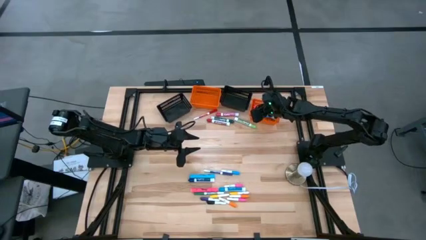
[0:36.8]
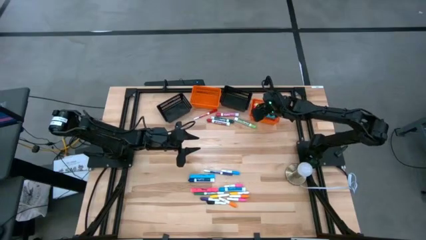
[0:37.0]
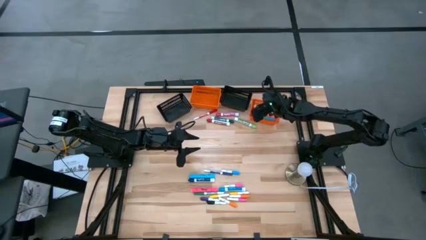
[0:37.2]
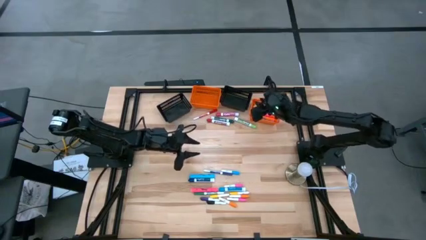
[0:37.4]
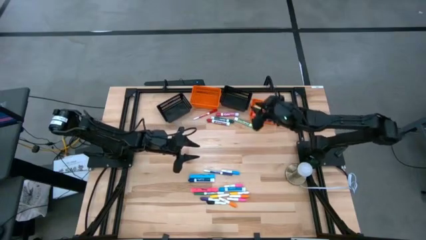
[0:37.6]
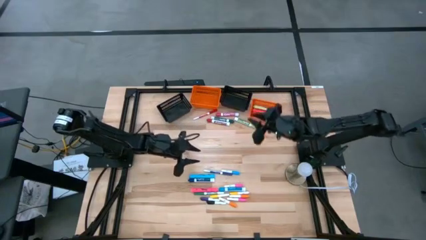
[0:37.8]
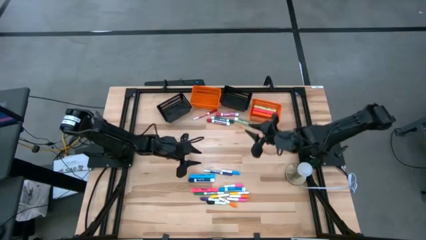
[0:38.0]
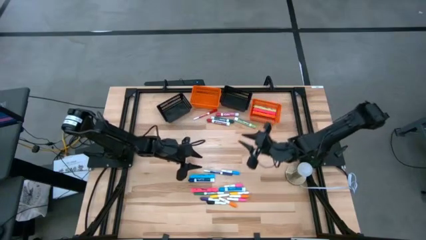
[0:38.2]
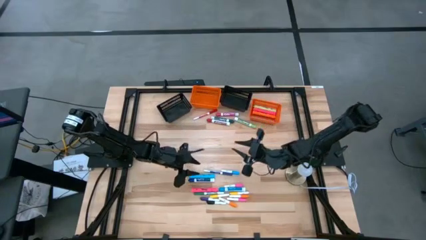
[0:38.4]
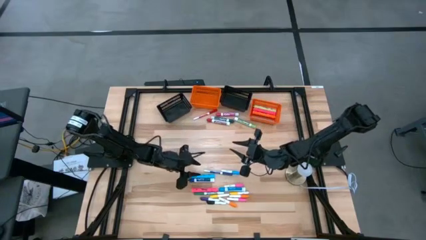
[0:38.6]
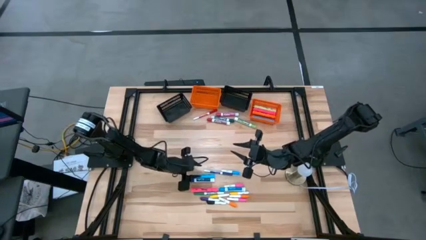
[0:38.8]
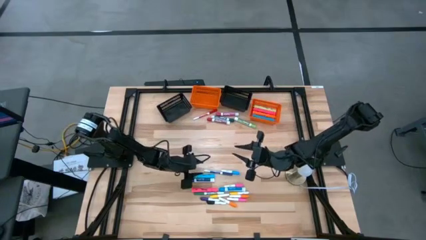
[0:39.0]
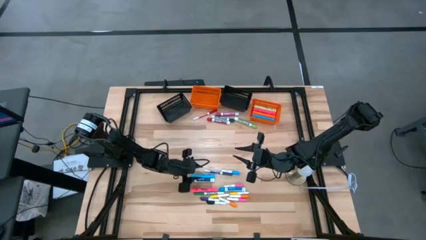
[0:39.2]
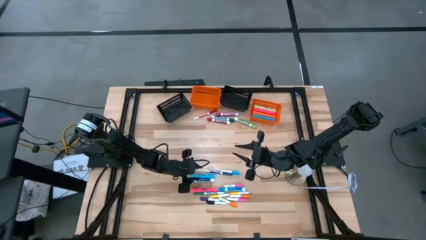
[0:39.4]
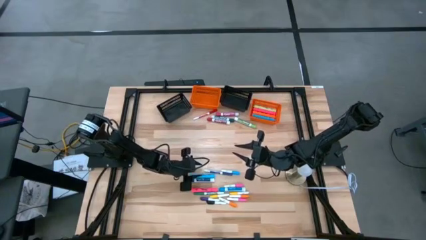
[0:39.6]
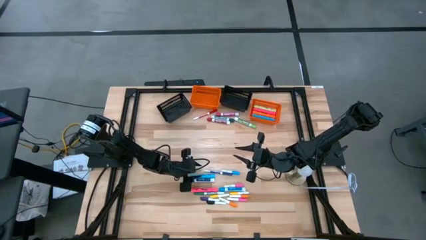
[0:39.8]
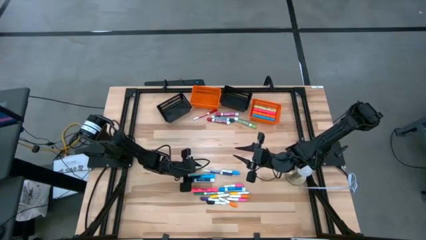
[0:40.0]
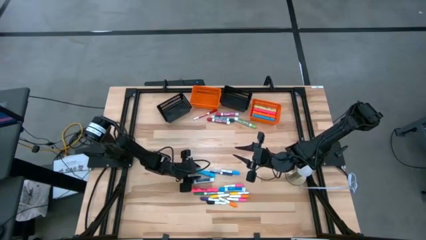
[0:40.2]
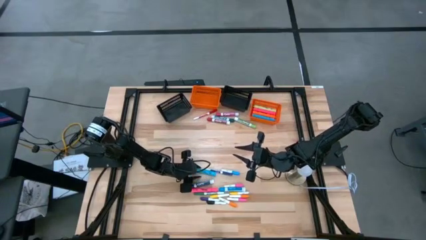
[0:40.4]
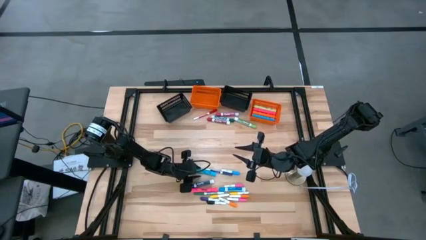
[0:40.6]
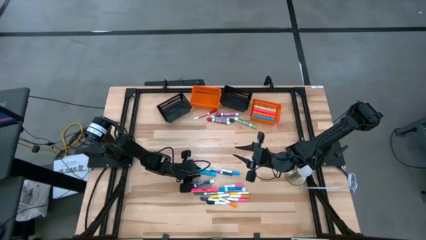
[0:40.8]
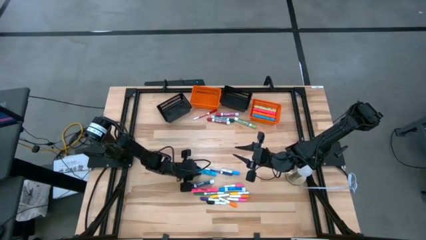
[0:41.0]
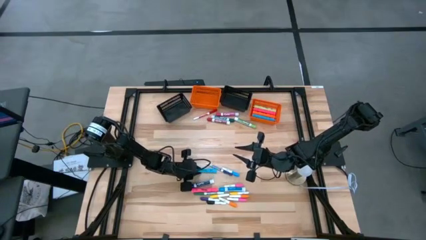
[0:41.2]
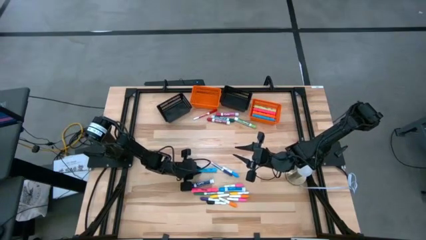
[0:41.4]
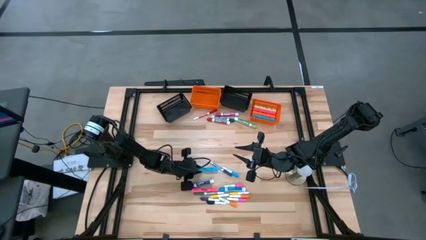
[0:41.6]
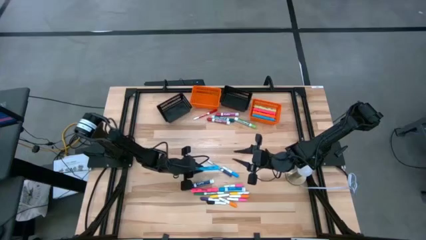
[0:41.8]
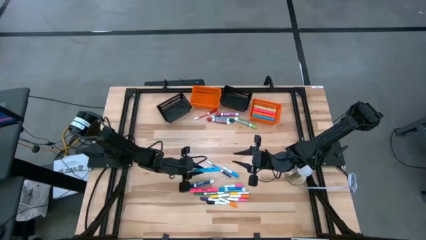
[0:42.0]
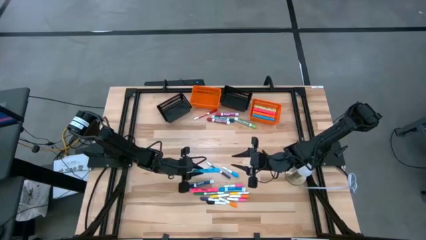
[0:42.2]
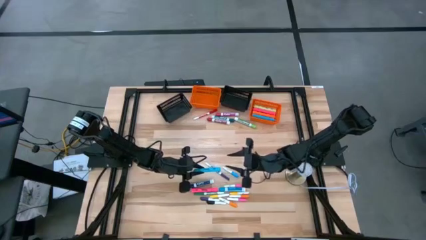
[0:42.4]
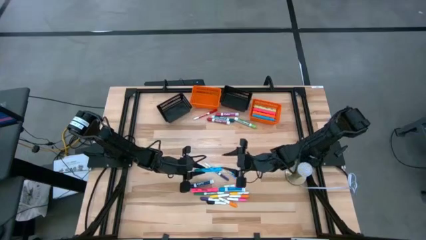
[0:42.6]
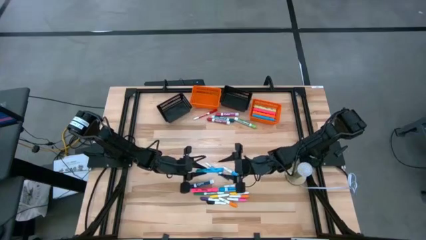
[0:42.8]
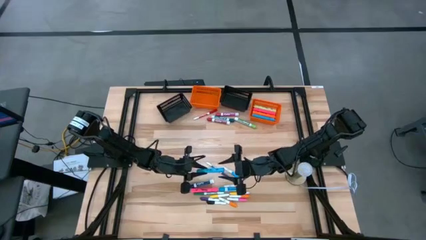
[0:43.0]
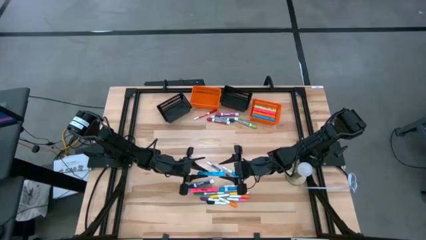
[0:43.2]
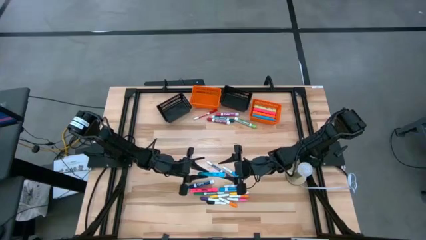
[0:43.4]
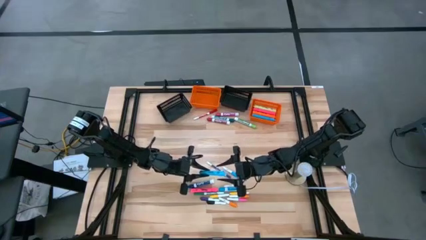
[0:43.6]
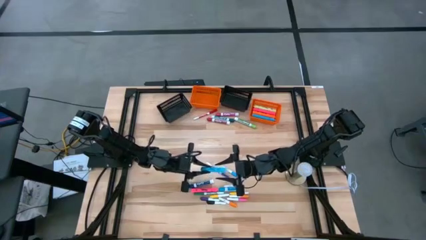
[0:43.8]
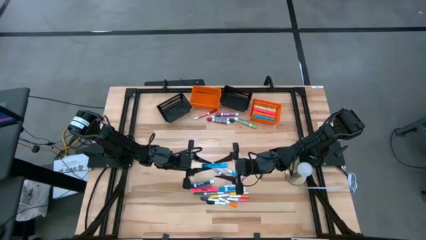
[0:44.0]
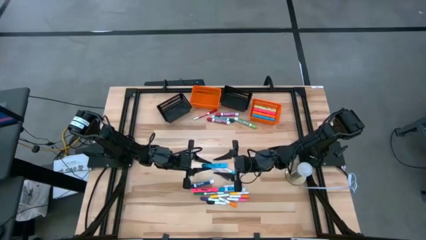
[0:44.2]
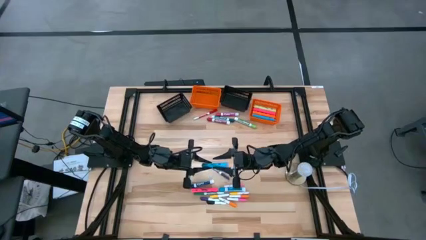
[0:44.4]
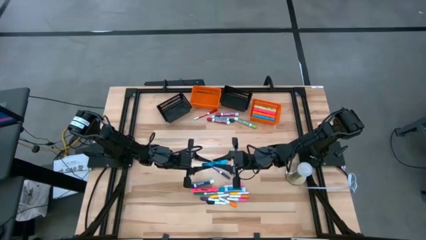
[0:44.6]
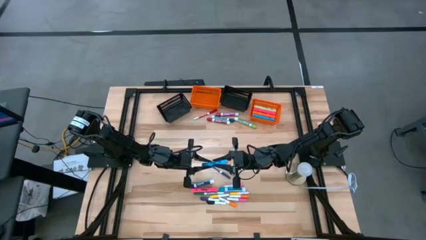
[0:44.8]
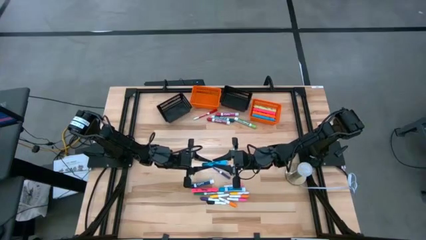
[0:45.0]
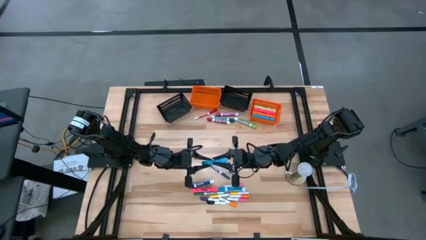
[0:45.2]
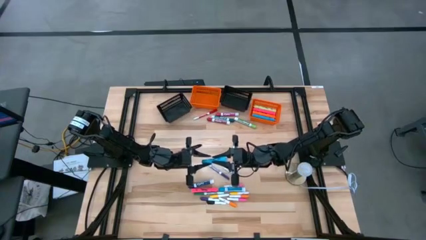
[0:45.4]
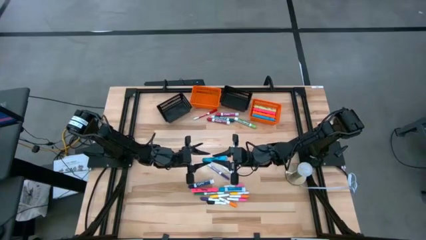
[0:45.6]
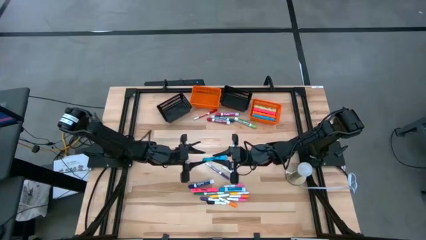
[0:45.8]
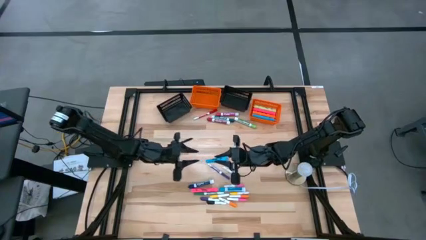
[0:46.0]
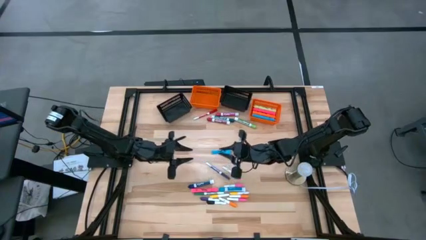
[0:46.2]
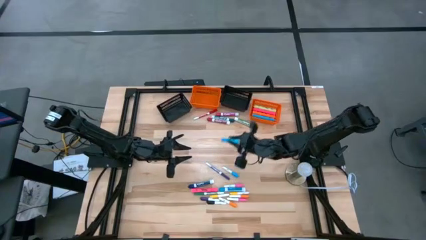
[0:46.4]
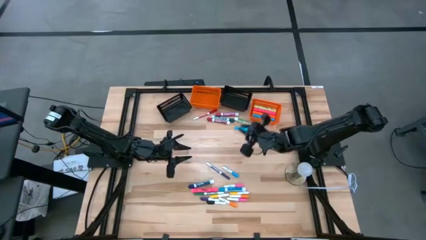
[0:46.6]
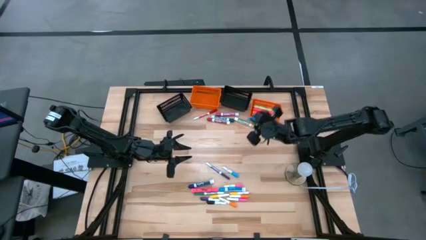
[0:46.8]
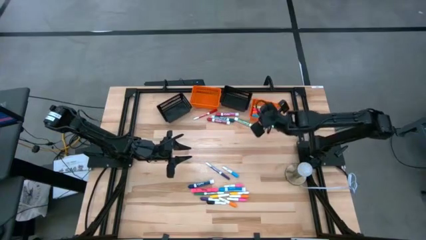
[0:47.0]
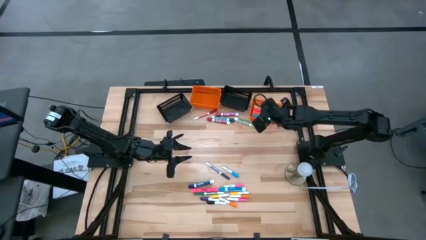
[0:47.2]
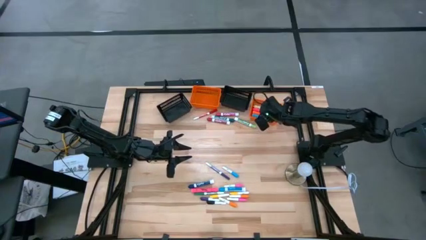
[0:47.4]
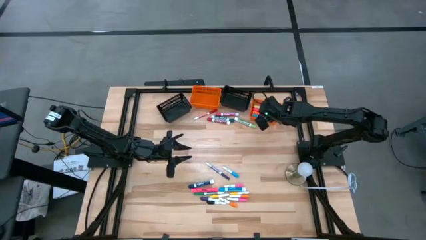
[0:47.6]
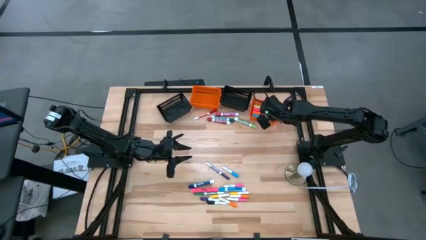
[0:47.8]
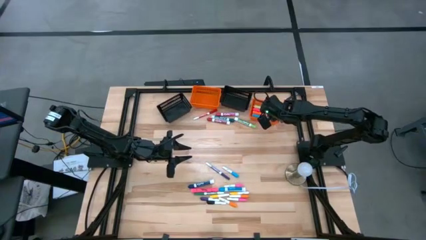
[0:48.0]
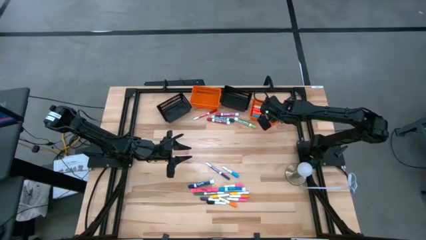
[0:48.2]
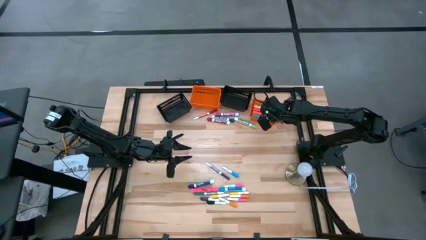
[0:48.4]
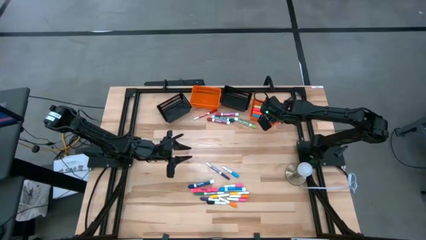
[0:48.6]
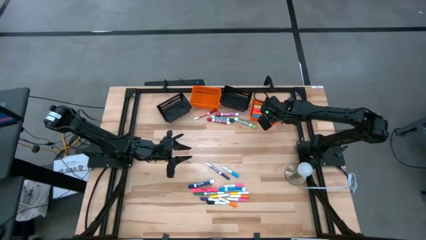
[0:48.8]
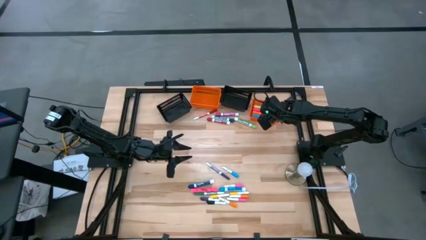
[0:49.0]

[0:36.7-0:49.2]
Task: Pick & Place Markers
Put the large light blue highlighter into the right orange bin

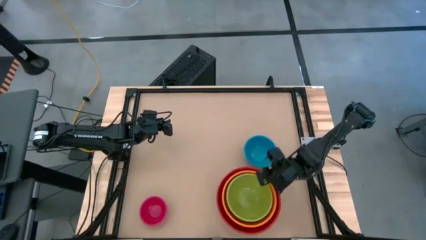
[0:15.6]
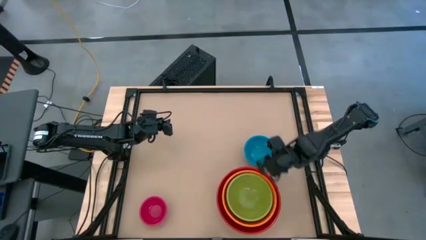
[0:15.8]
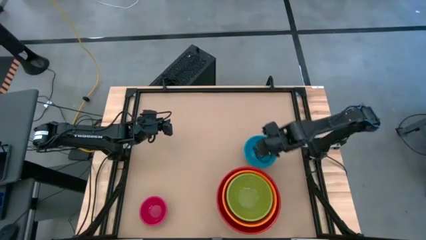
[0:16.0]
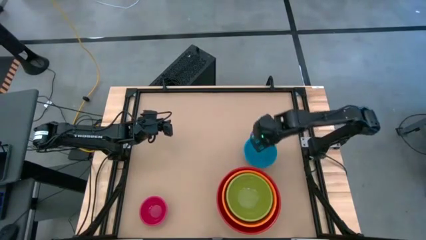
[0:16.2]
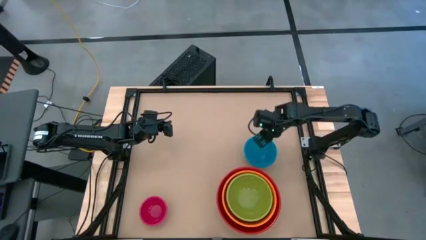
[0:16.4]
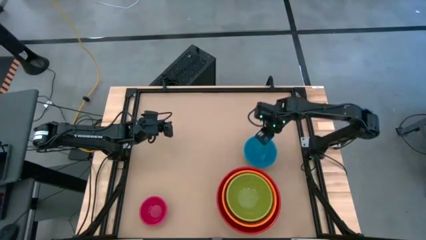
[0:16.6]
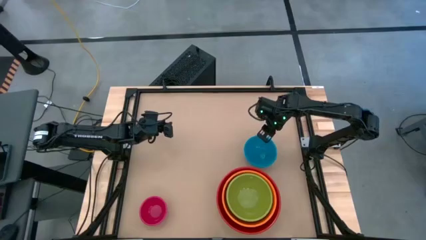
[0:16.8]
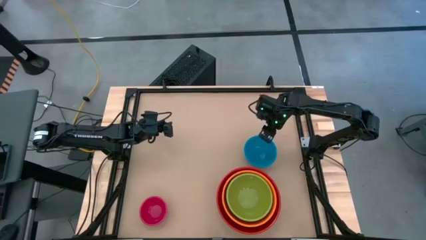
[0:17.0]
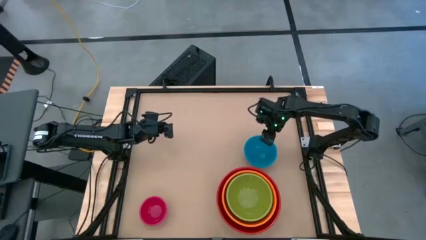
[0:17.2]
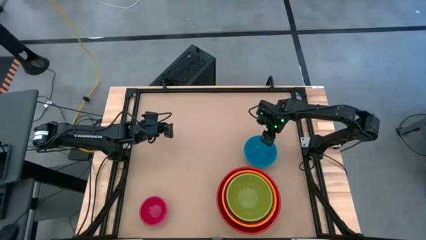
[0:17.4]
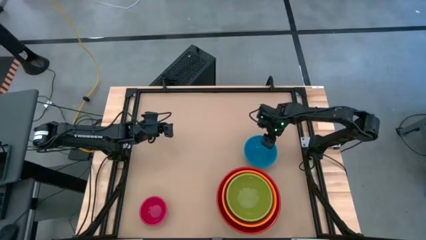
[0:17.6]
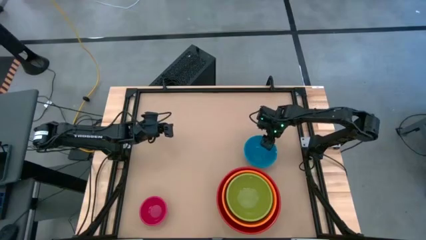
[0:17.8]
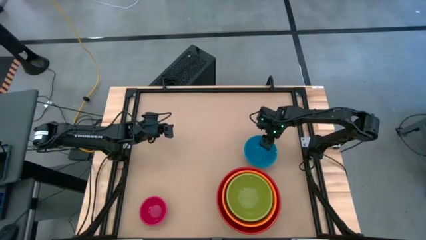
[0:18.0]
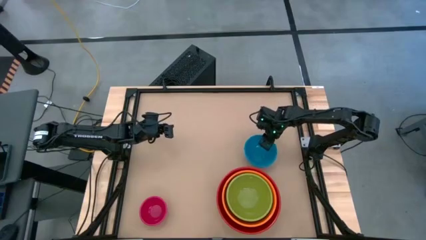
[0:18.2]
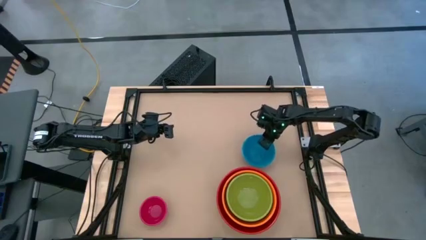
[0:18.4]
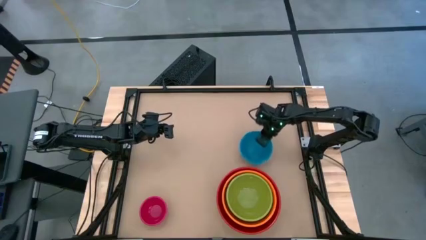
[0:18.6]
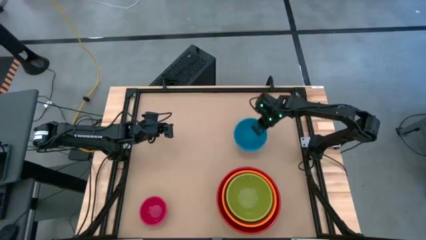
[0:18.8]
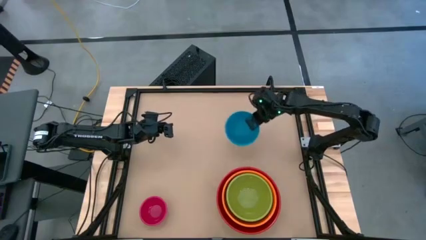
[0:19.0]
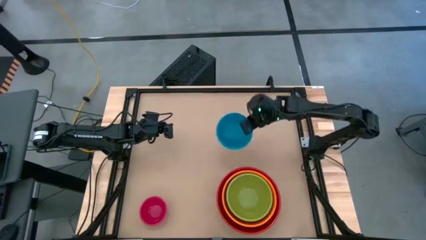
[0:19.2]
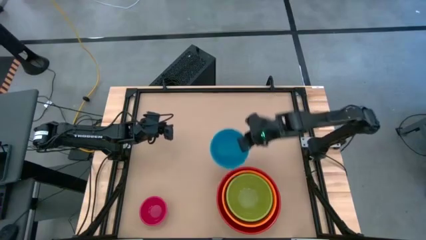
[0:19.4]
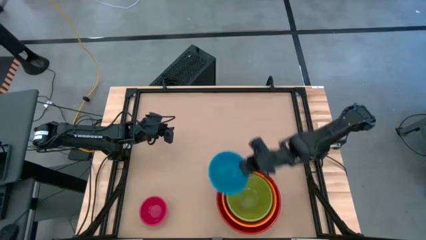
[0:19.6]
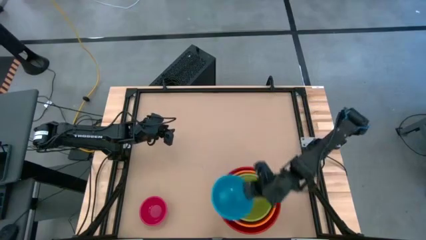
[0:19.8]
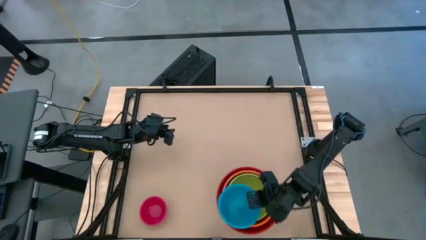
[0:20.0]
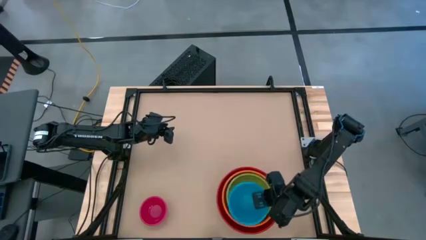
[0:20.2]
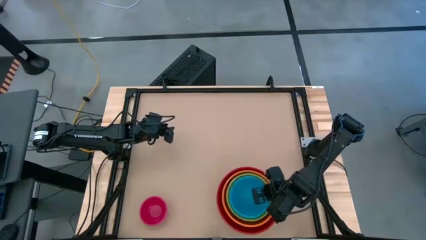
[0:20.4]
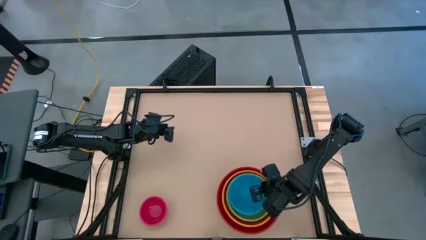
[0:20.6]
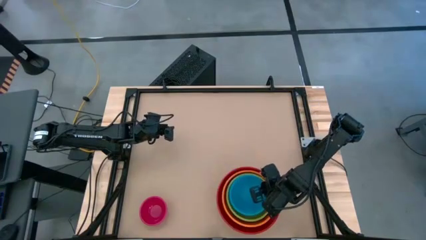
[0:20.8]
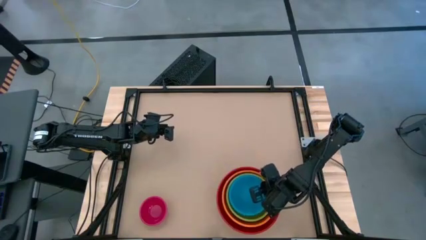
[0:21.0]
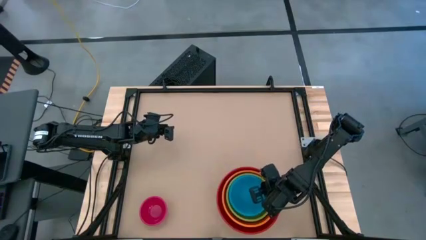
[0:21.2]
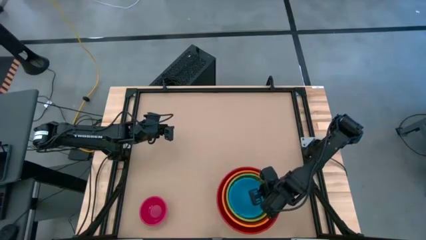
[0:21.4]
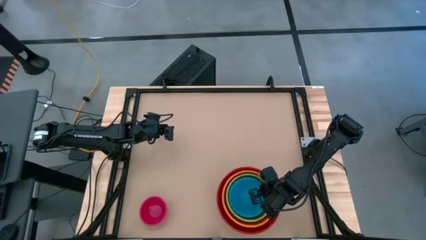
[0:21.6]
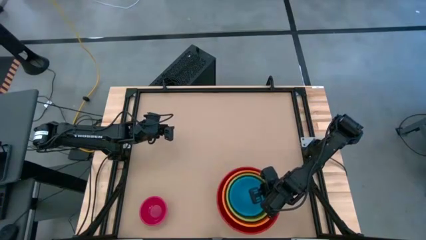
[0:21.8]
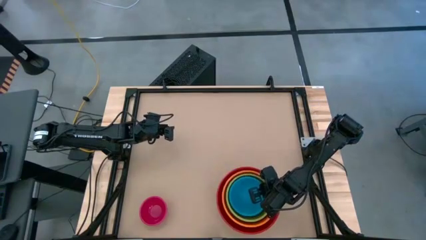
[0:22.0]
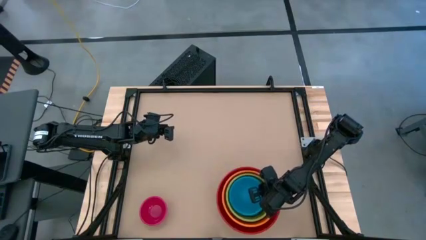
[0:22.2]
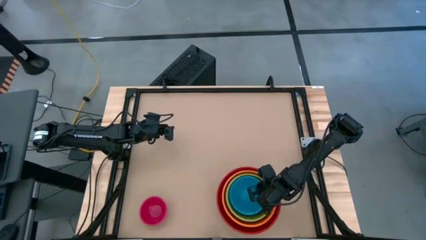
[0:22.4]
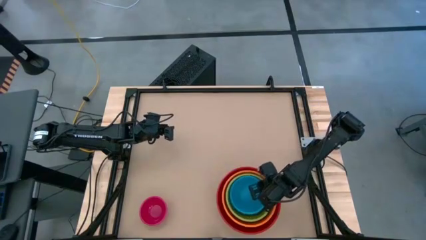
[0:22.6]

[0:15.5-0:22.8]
Task: Nest bowls inside each other by size order
Stack the blue bowl on the green bowl
